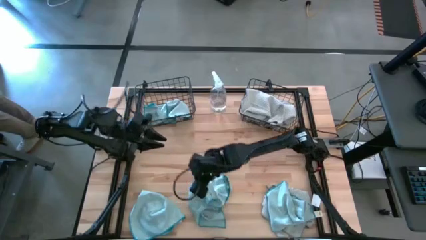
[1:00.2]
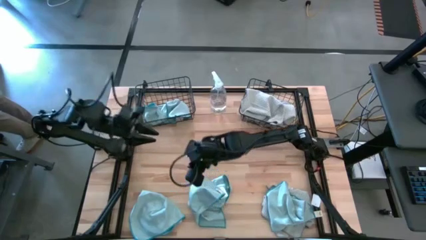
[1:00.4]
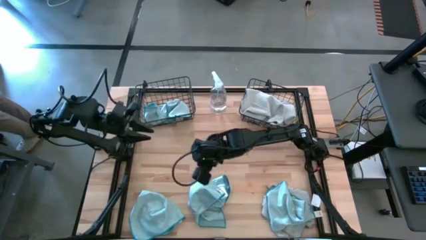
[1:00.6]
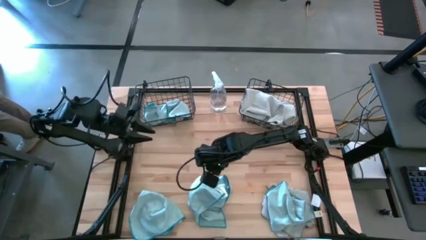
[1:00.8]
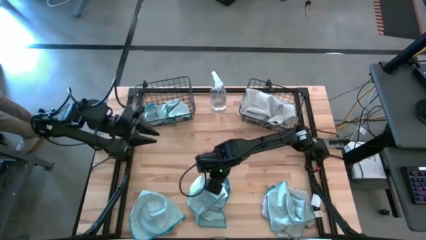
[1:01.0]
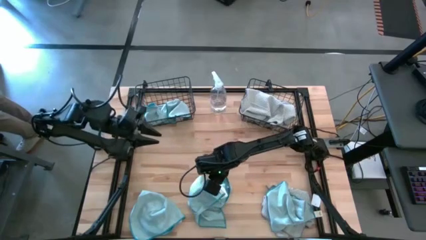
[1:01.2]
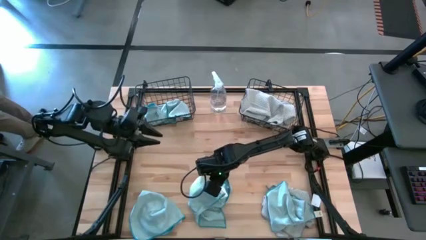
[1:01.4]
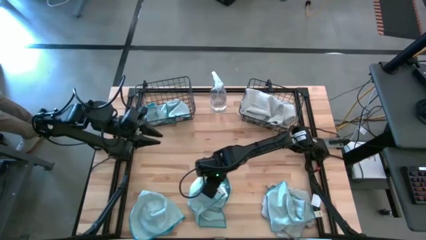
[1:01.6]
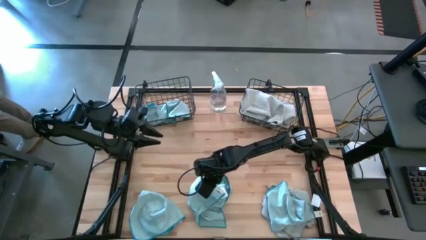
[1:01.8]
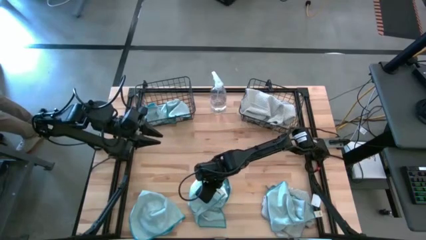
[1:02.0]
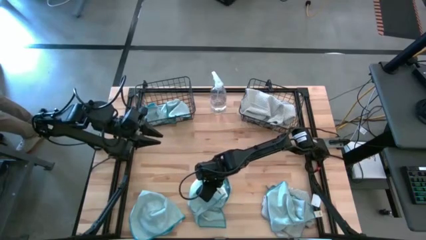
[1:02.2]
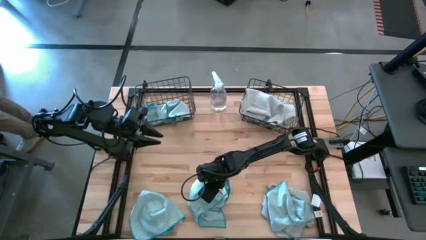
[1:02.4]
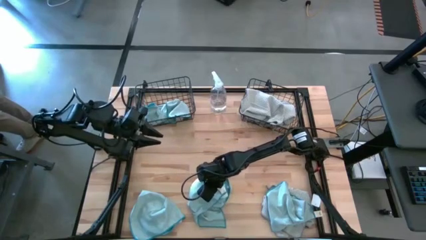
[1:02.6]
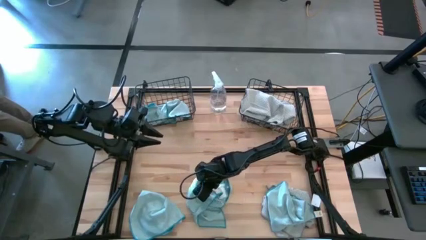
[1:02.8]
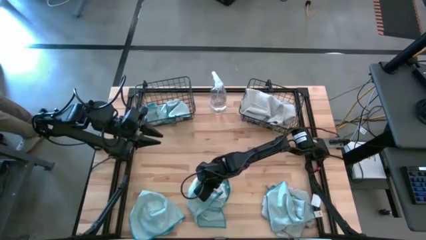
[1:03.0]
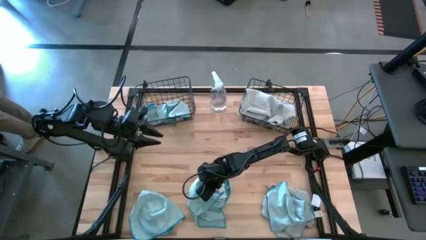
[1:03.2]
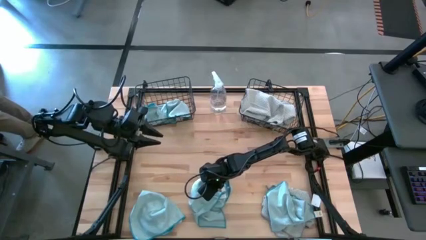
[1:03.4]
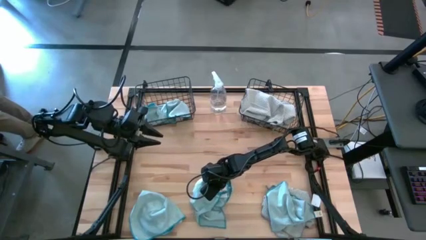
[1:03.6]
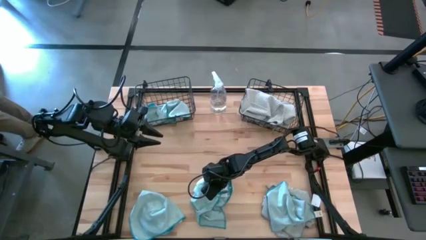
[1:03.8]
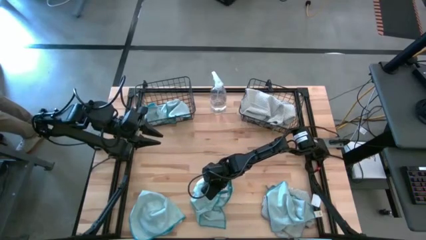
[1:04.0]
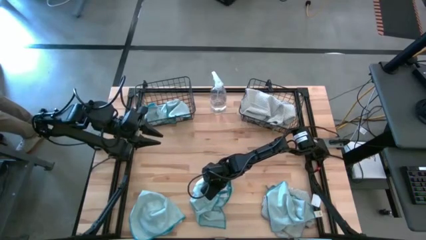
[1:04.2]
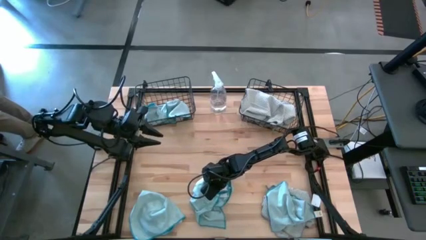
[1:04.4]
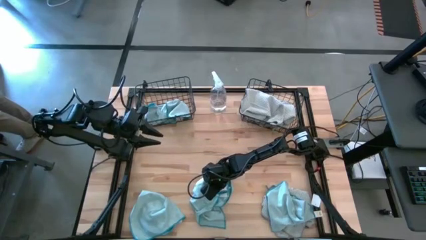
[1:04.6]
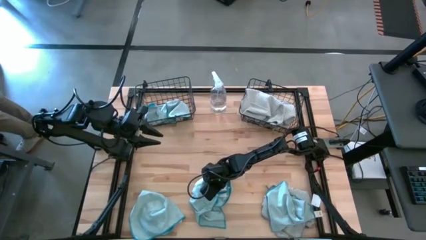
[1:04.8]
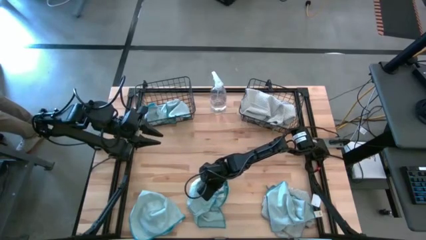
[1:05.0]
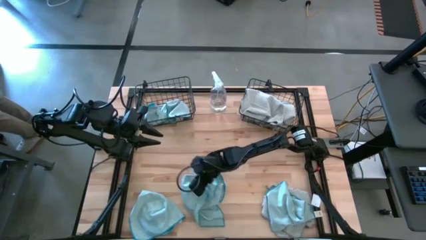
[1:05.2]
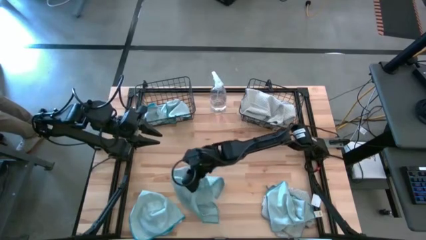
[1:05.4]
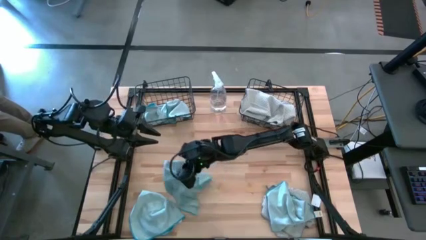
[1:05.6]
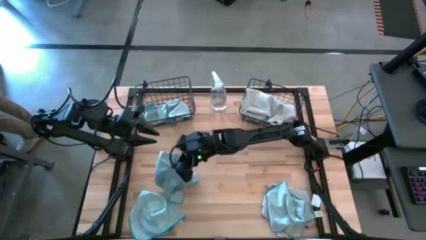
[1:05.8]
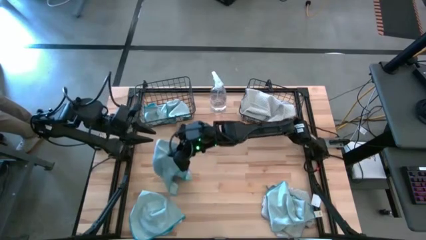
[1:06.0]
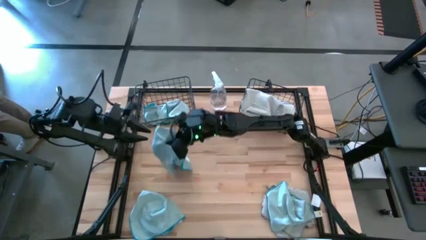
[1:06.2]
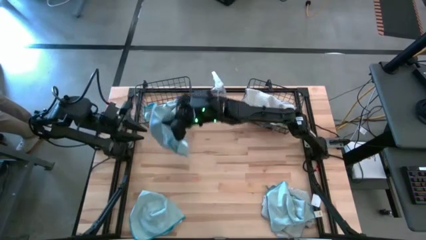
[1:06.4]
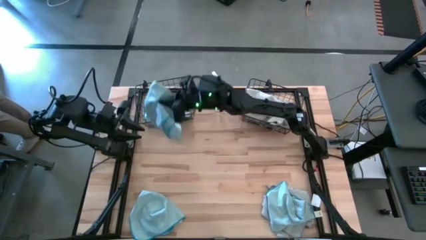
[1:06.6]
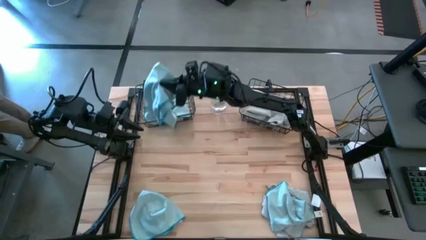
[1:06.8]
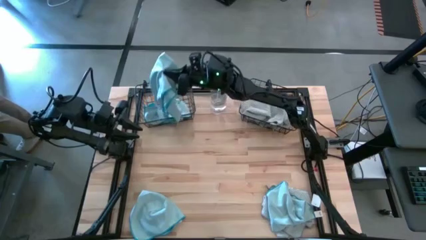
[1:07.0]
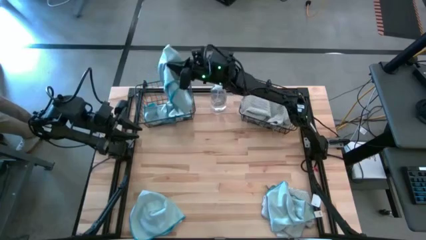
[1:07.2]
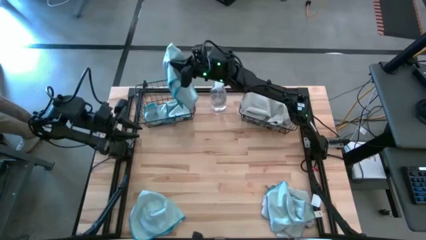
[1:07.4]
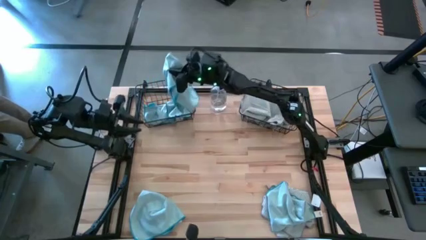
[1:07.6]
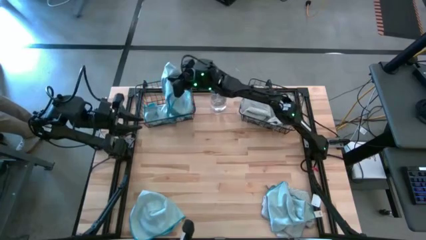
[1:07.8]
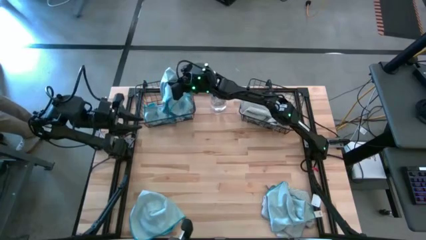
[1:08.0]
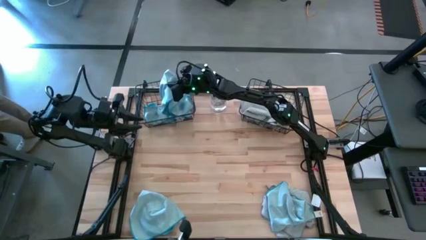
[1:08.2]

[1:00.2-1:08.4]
Task: Sort microfiber towel by color & place in baskets
Put the blue microfiber towel into the left black wire basket

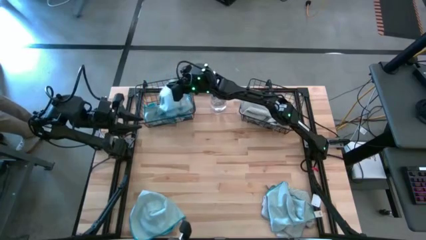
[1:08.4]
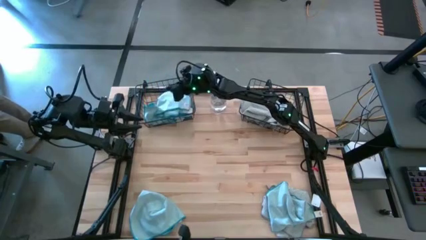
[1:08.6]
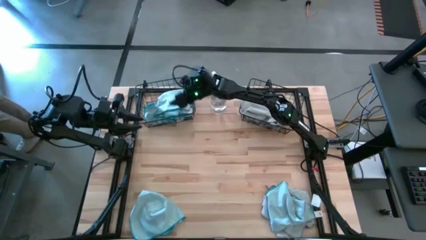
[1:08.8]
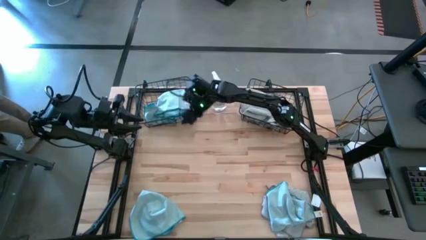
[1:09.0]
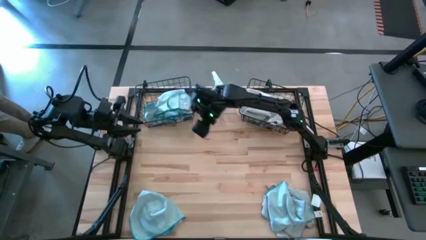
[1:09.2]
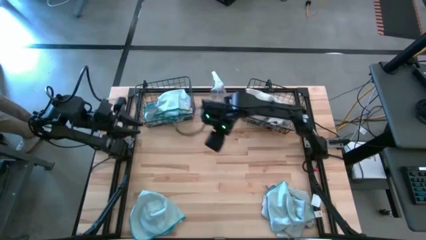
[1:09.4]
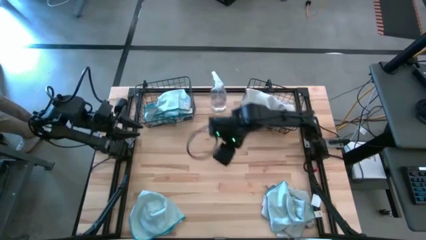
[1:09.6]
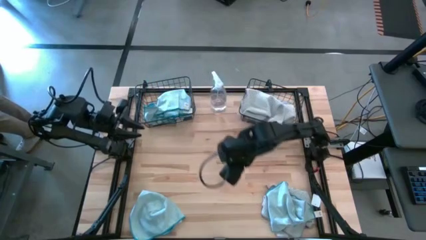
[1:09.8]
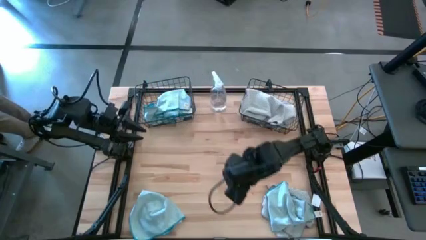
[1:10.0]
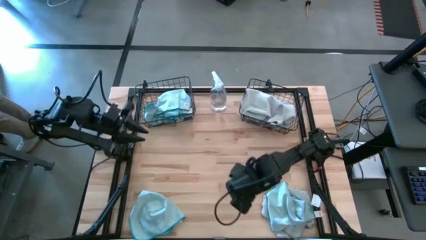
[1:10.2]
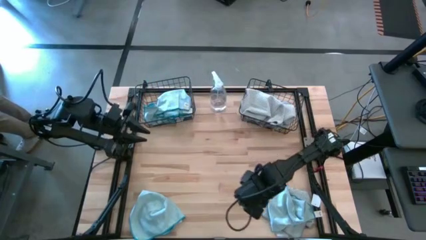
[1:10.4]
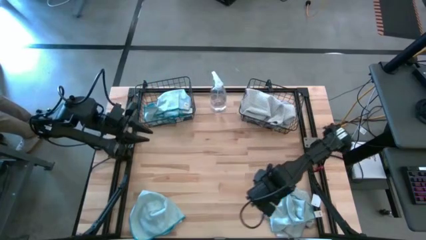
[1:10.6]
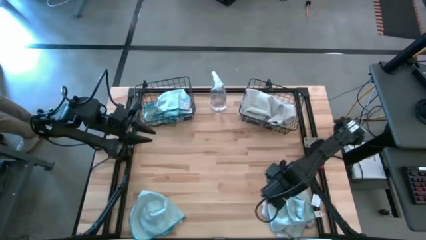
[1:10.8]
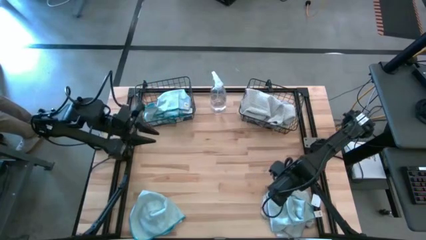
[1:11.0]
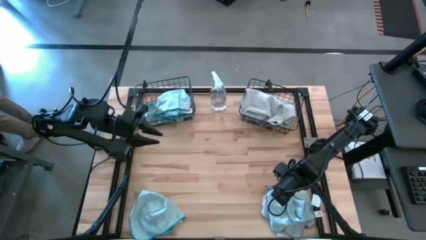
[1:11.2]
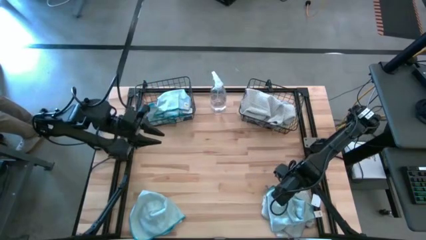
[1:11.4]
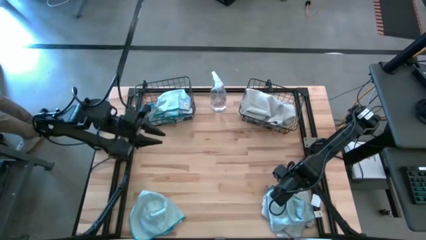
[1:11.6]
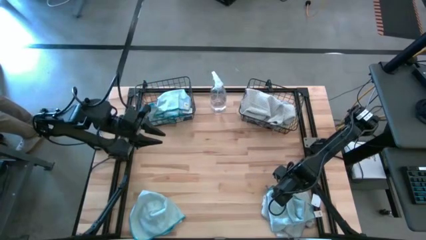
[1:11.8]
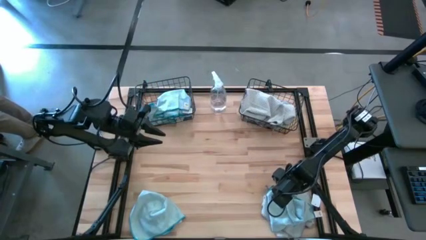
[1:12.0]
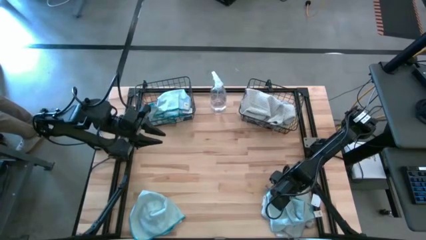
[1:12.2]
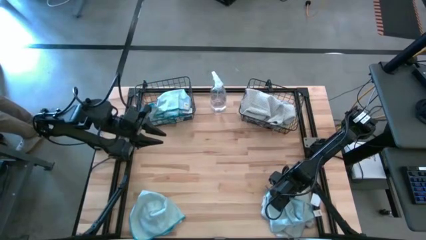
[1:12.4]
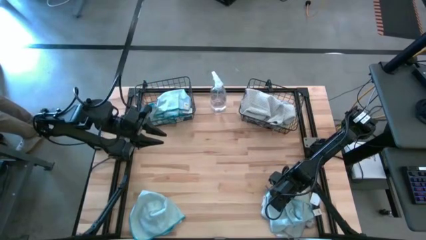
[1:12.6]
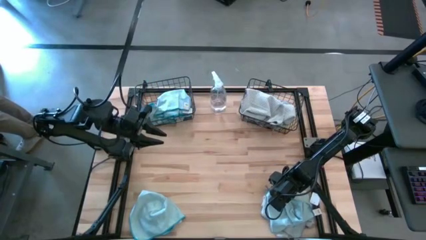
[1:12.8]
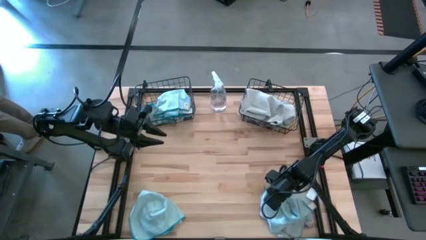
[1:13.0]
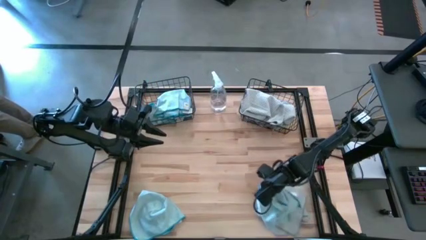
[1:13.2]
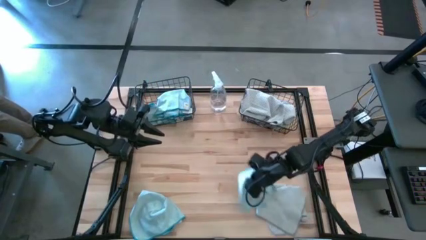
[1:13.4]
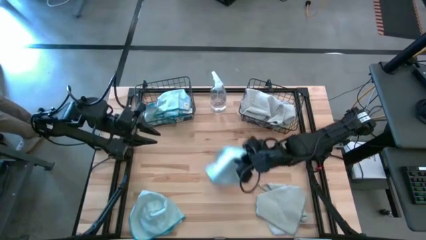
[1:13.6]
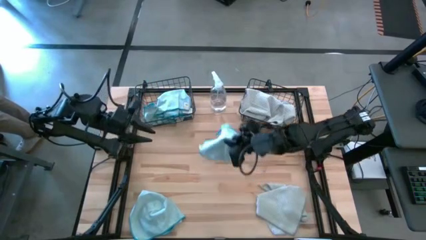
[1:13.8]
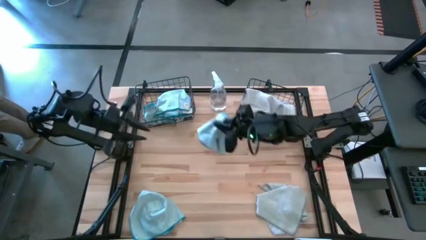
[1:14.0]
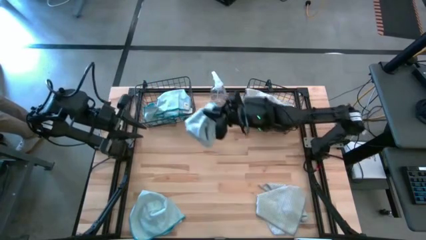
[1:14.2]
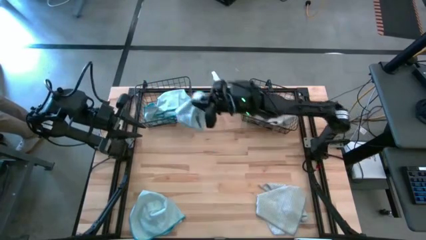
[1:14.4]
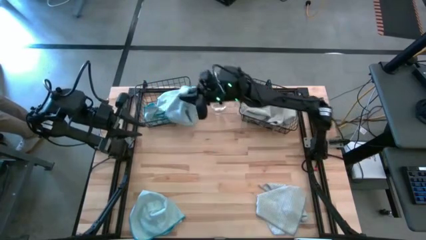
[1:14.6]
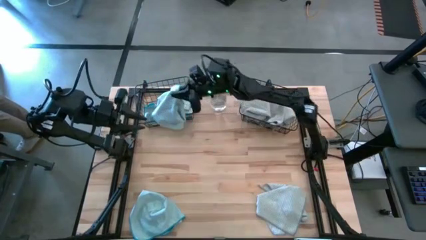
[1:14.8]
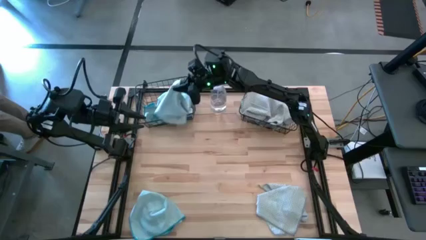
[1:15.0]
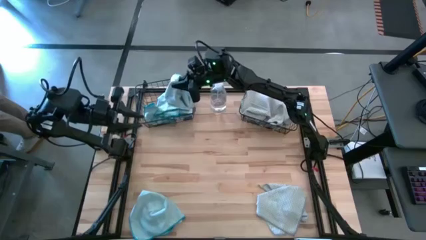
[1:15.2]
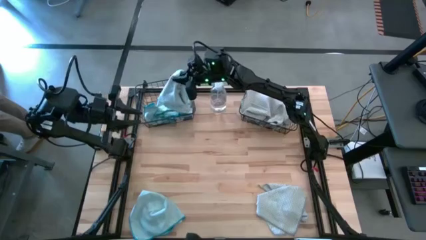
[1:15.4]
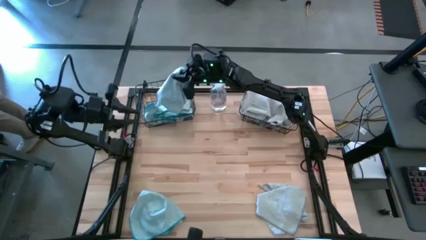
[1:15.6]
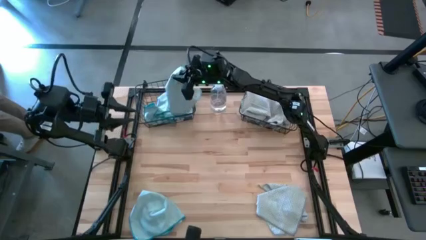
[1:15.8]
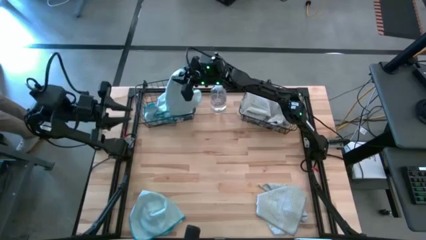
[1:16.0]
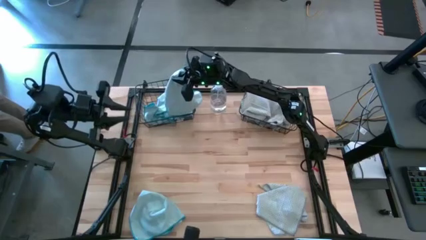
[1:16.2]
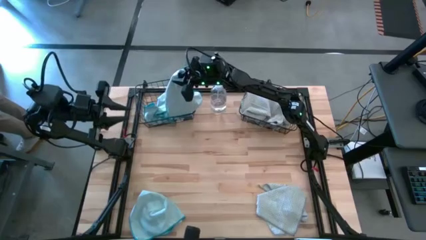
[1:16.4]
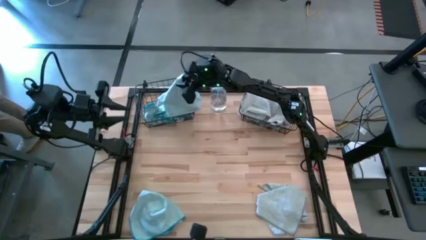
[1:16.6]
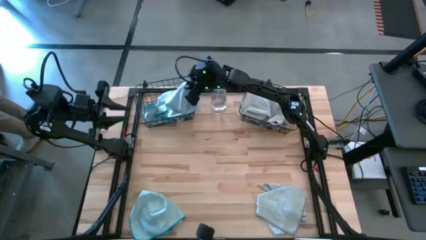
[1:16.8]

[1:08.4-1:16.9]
Put the blue microfiber towel into the left black wire basket
